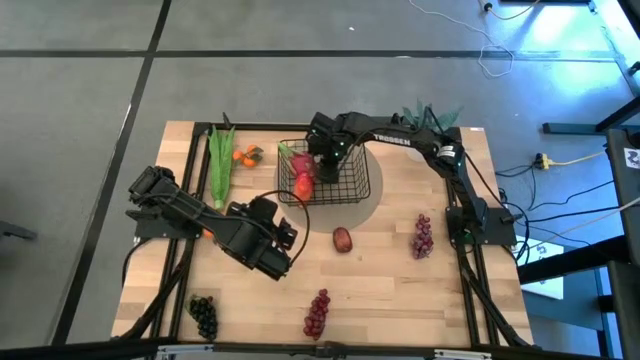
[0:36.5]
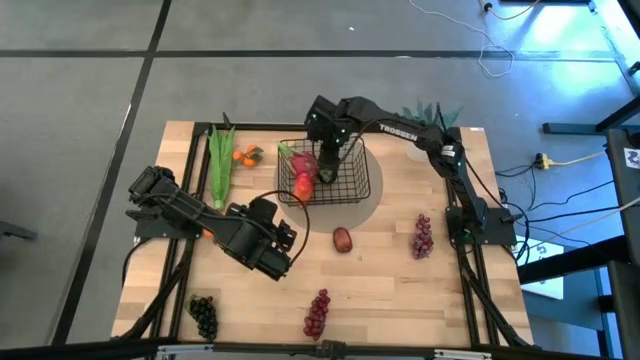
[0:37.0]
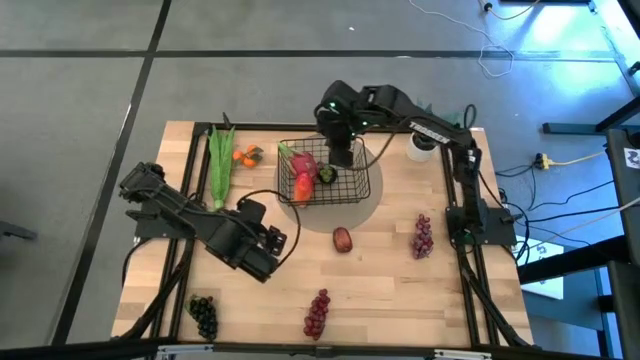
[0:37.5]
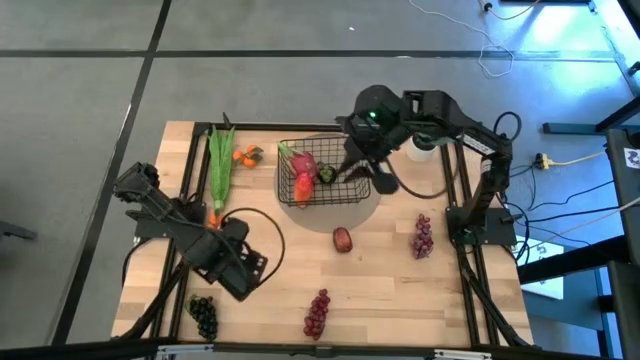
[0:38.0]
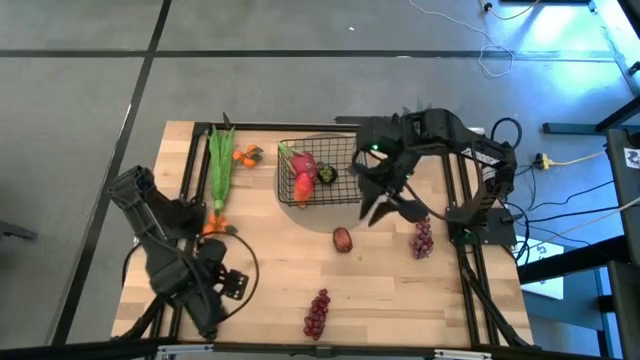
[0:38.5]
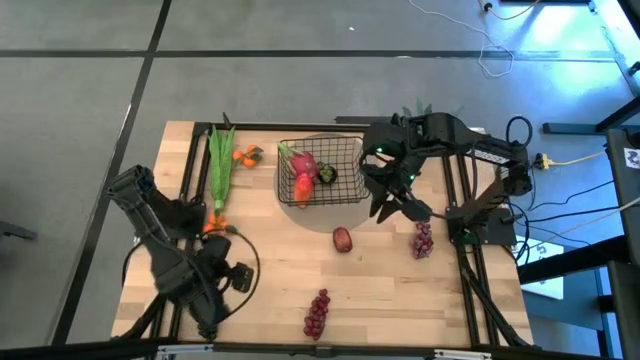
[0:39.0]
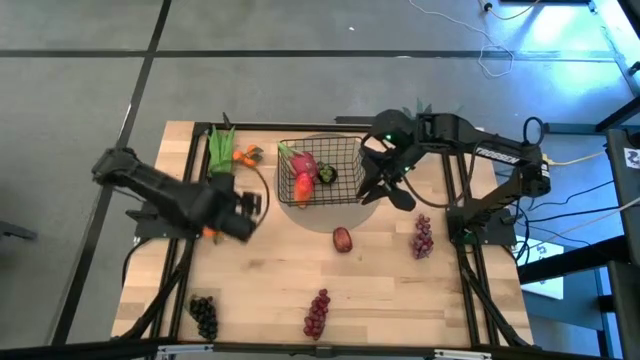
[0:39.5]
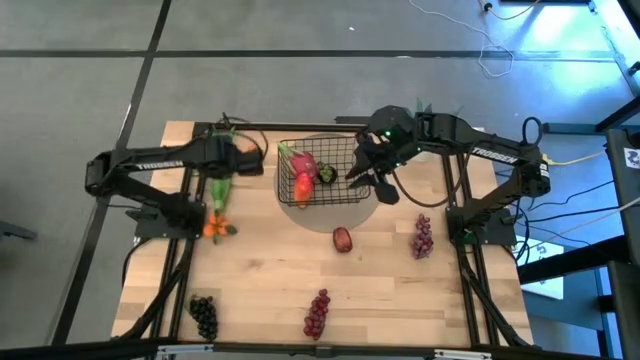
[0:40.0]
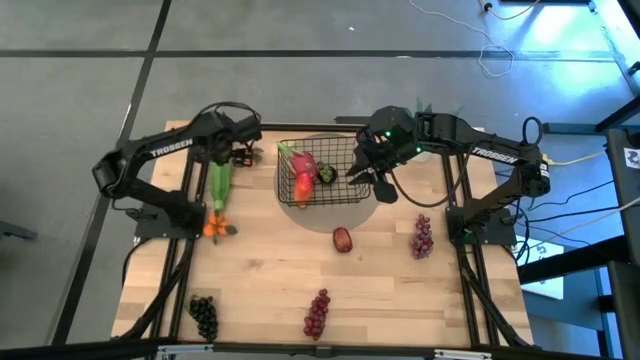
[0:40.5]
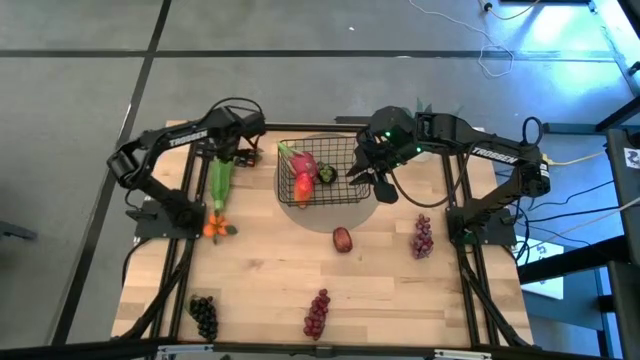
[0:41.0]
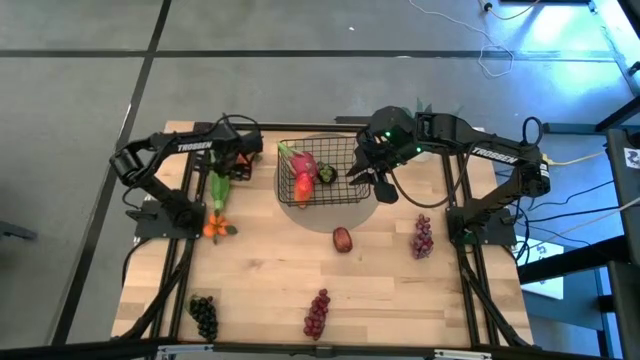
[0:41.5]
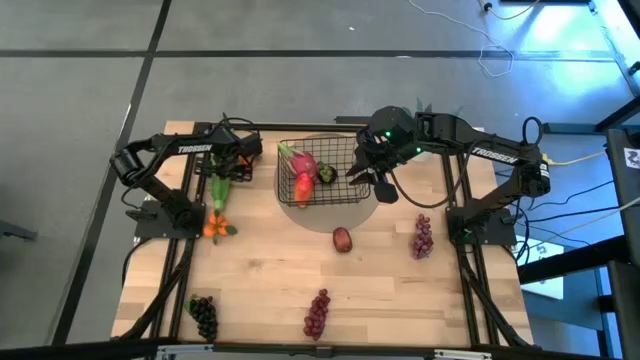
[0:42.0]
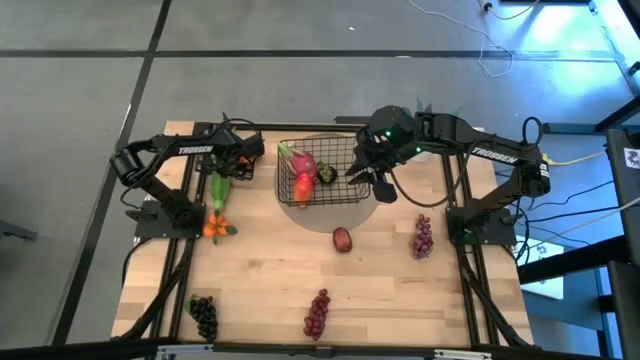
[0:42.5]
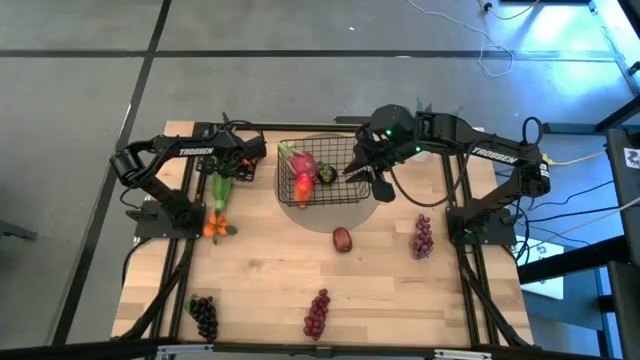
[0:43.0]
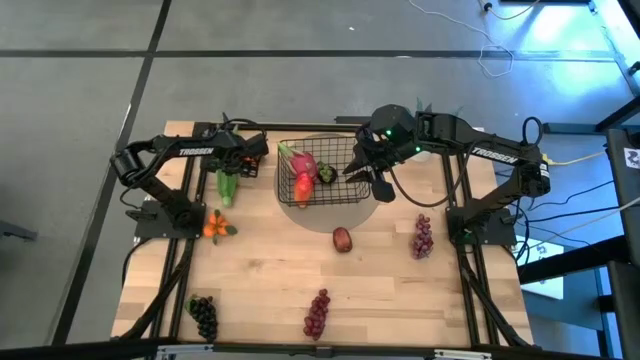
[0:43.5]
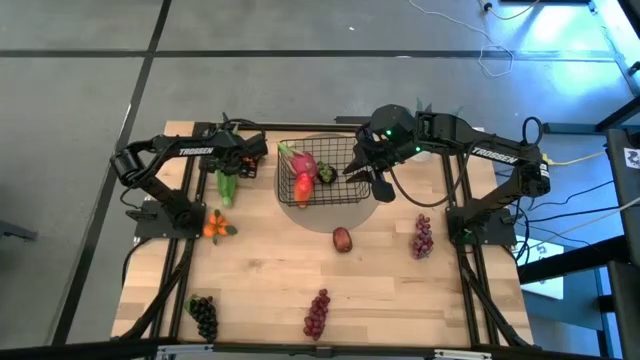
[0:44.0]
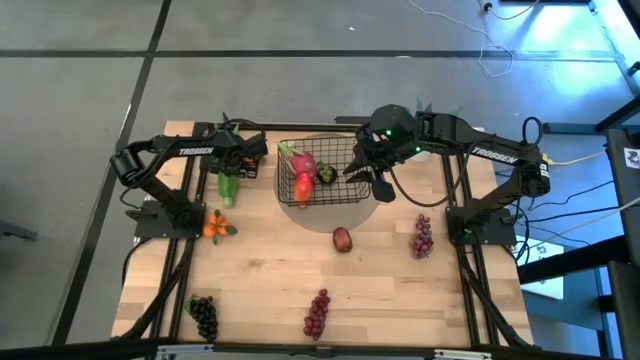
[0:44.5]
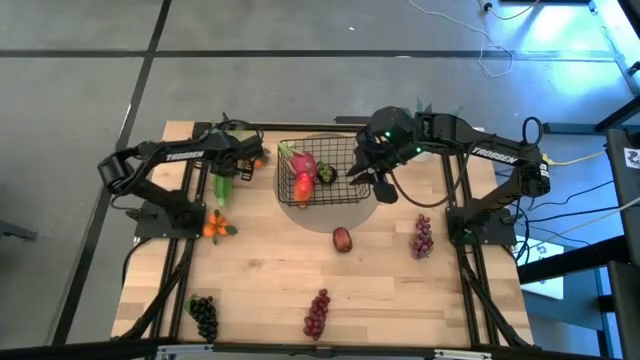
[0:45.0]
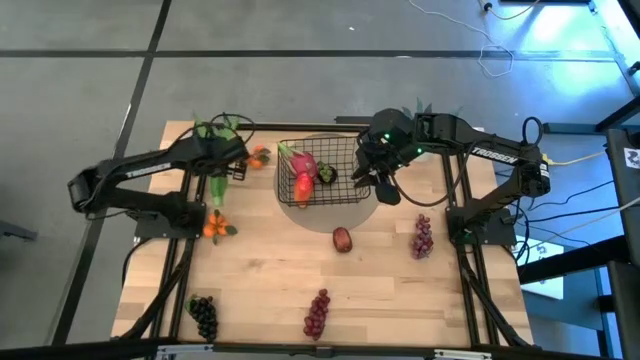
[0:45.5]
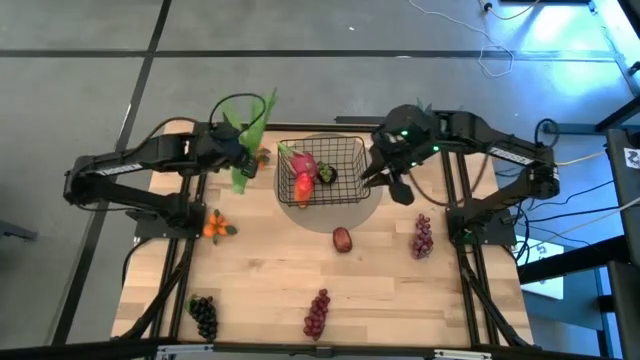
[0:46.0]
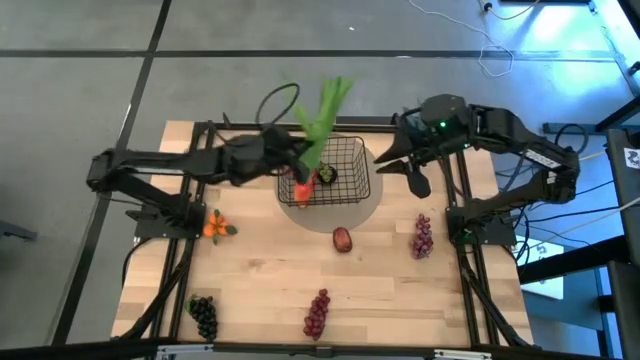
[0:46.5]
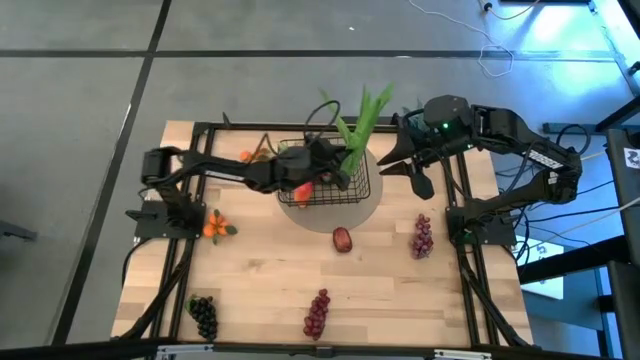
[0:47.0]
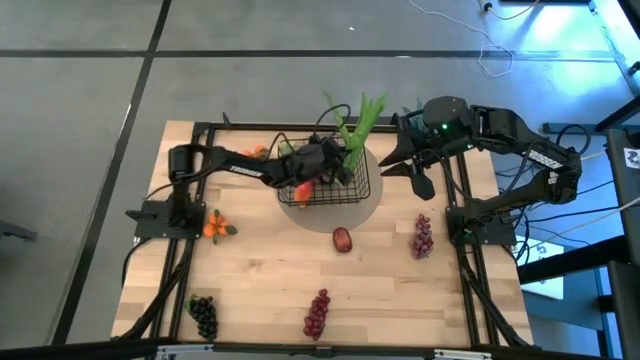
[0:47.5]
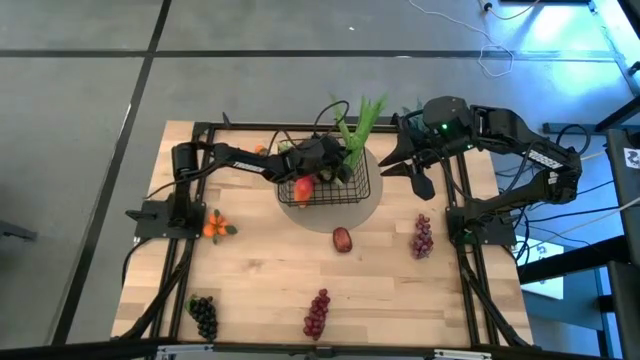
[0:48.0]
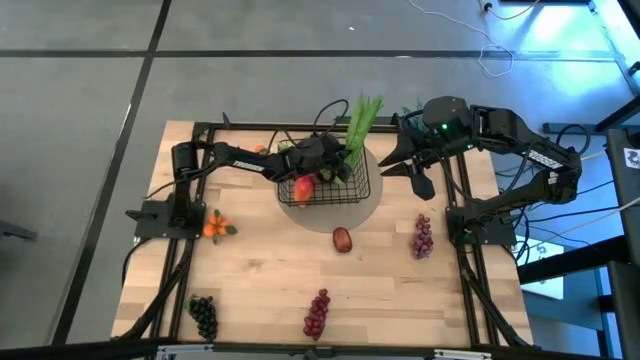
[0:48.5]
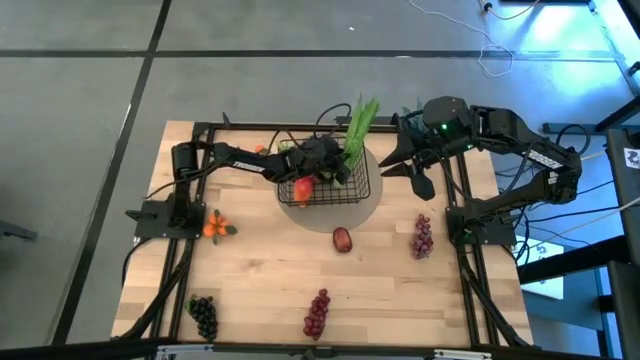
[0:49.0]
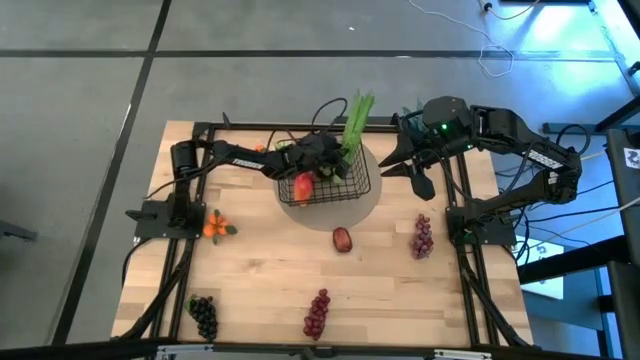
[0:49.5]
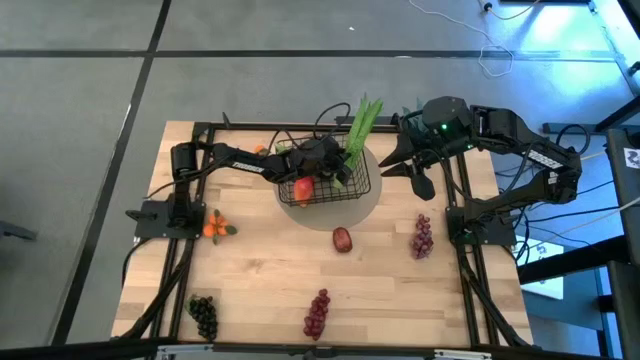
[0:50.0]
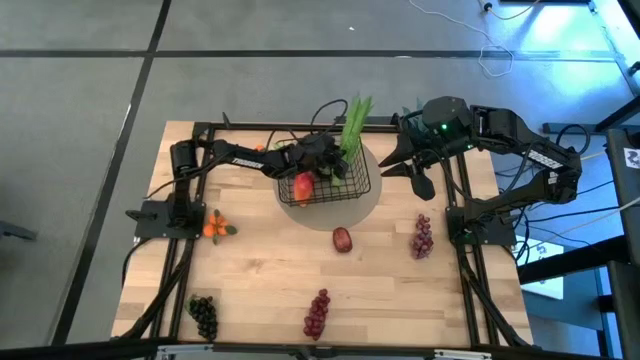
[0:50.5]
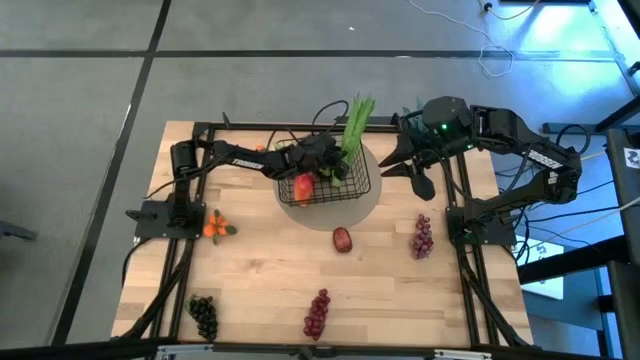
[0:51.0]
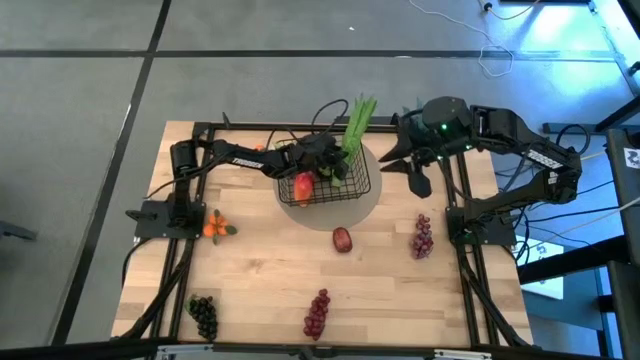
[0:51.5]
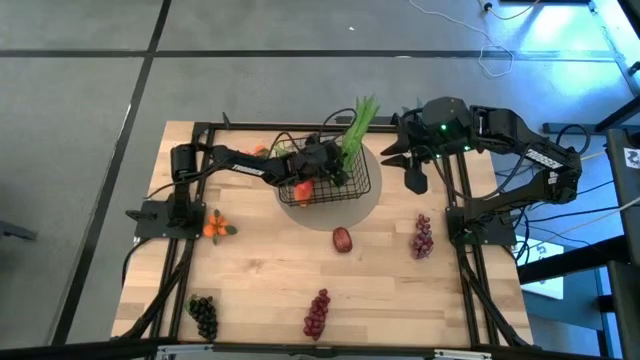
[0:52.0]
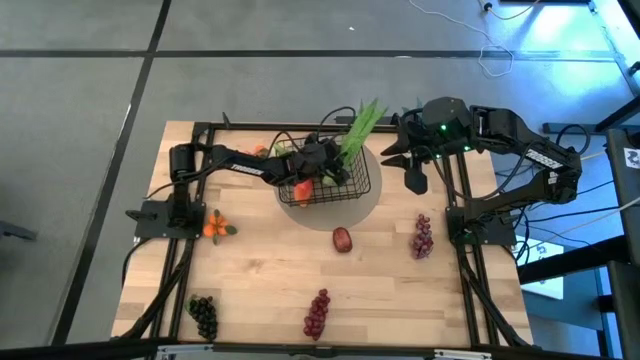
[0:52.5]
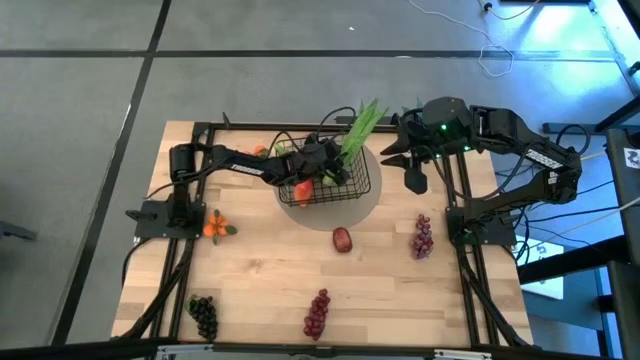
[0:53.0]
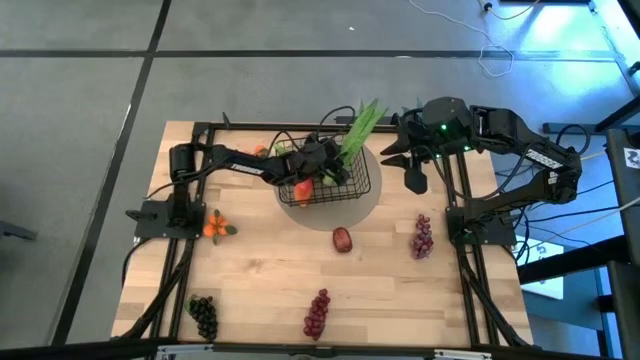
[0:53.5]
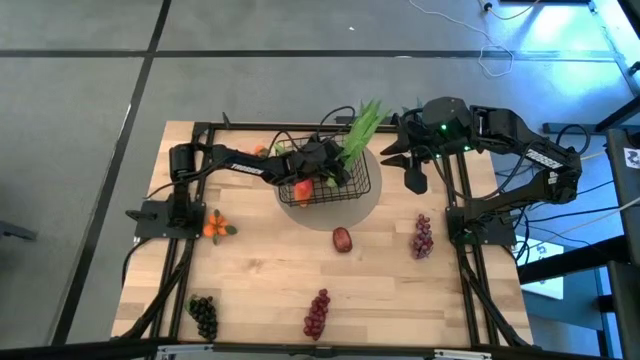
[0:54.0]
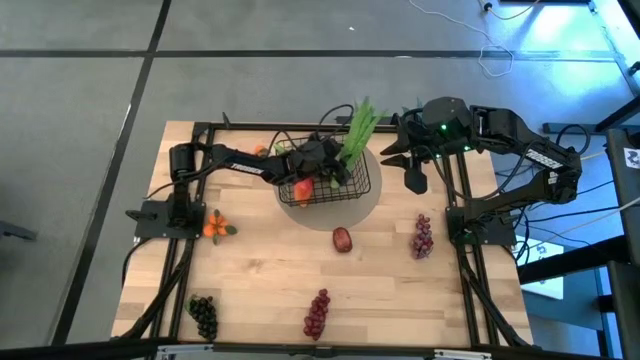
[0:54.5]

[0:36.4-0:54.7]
Task: Build produce basket
Put the green beans into the wire basket

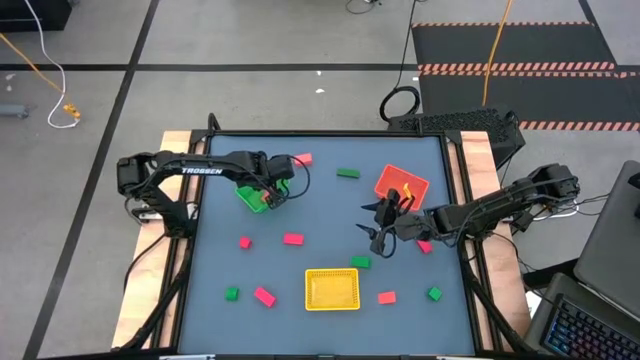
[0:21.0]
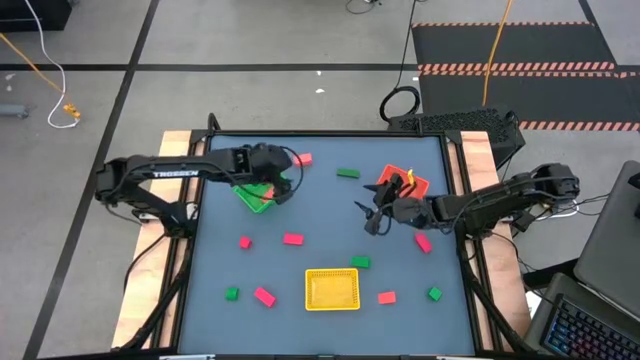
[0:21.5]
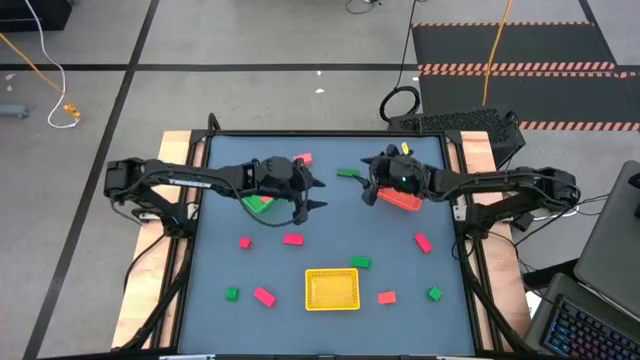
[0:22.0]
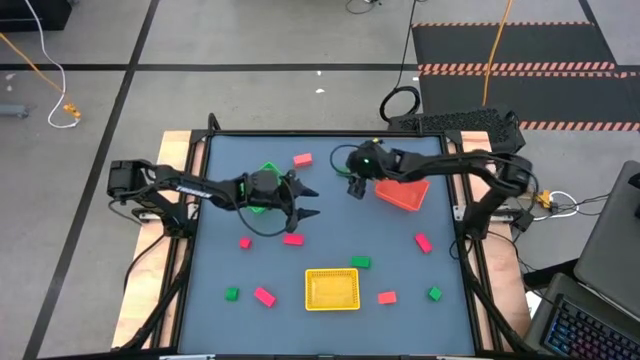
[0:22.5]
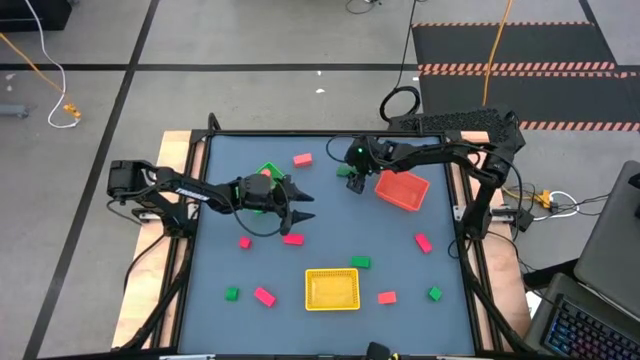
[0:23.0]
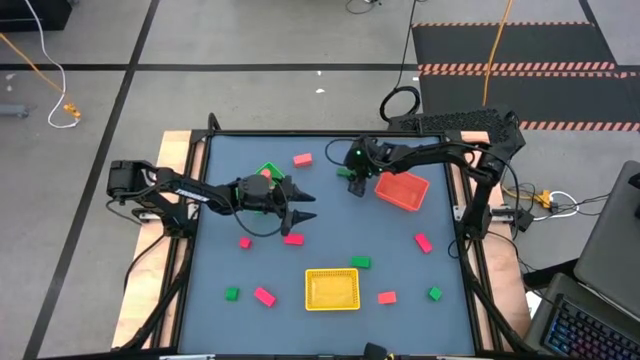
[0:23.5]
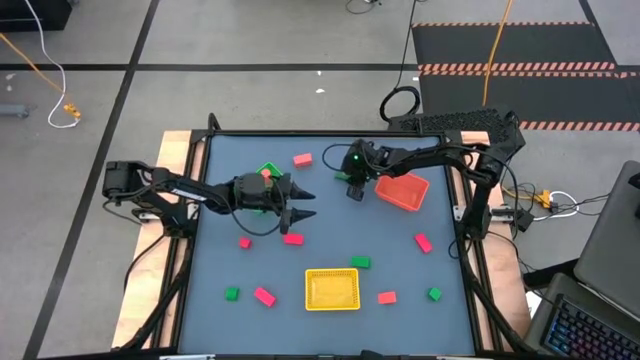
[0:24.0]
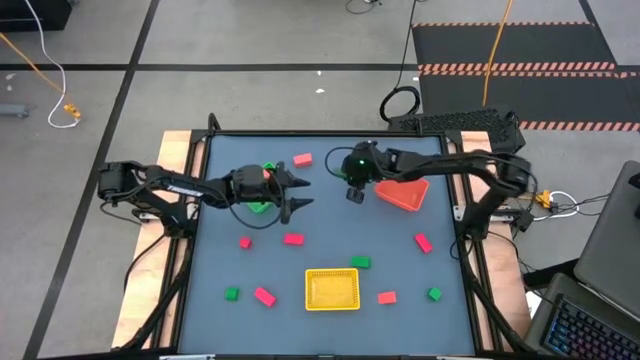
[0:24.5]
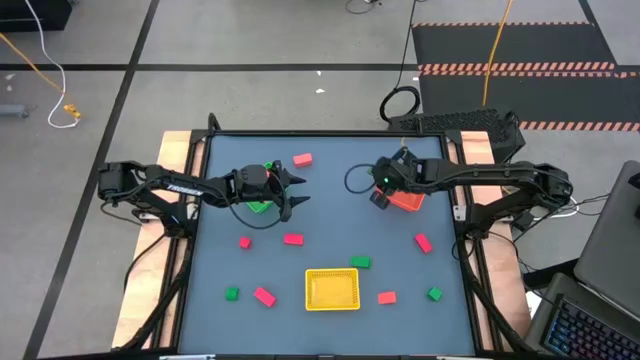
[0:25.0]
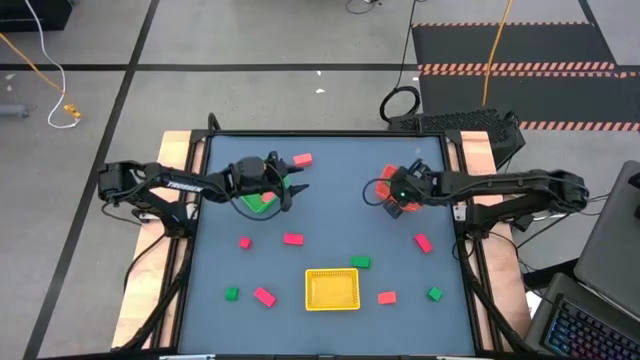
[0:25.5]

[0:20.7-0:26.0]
Task: Sort & place blocks by color
Put the green block into the orange bin
